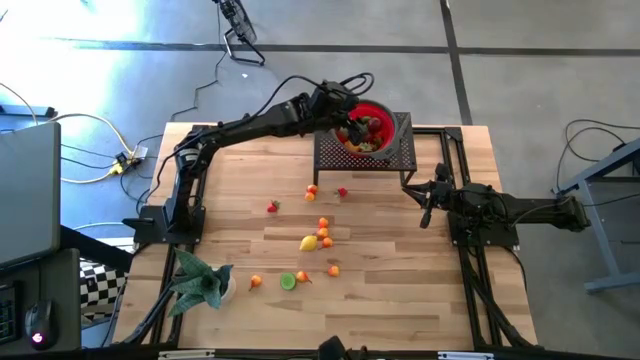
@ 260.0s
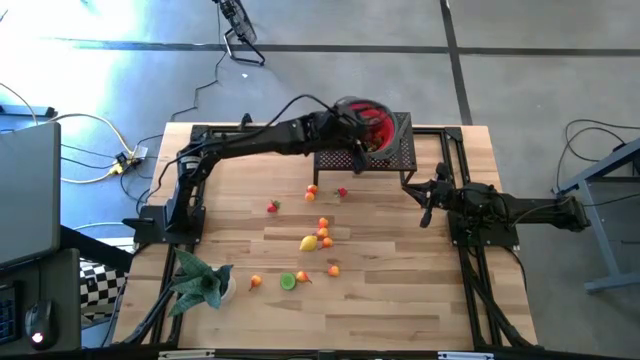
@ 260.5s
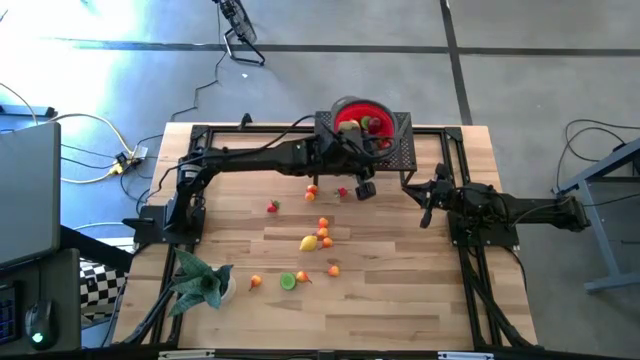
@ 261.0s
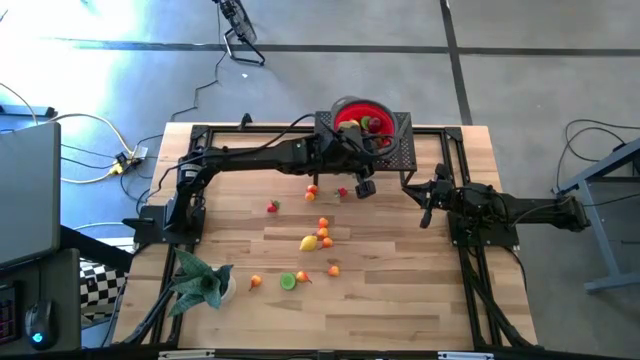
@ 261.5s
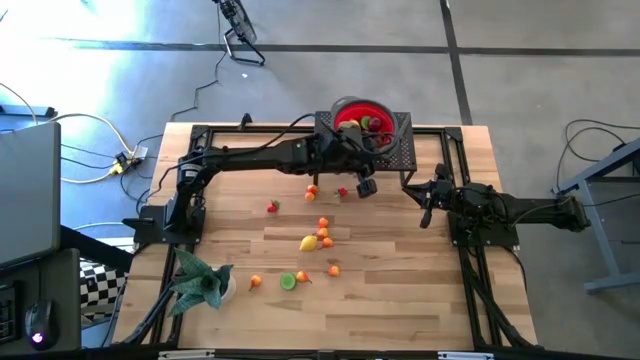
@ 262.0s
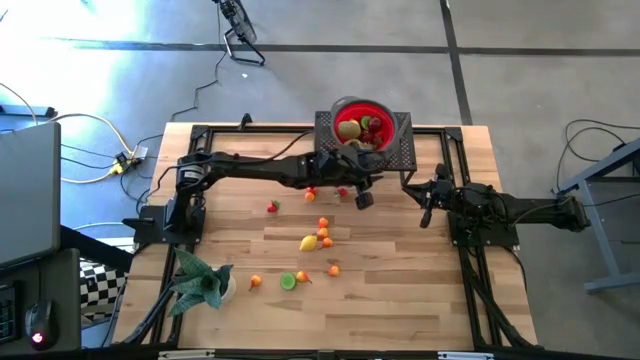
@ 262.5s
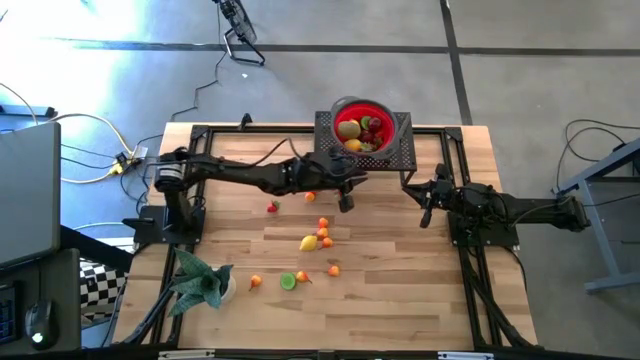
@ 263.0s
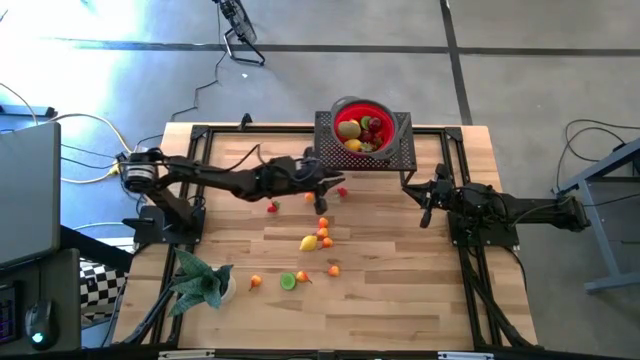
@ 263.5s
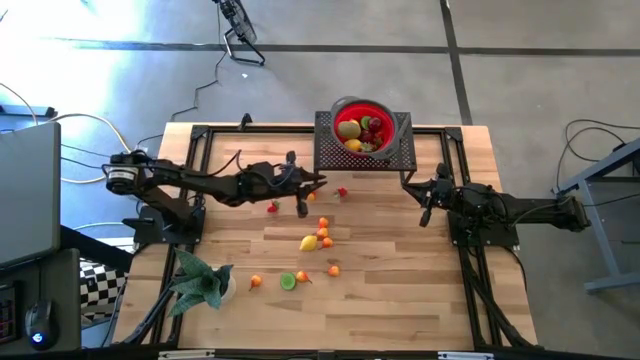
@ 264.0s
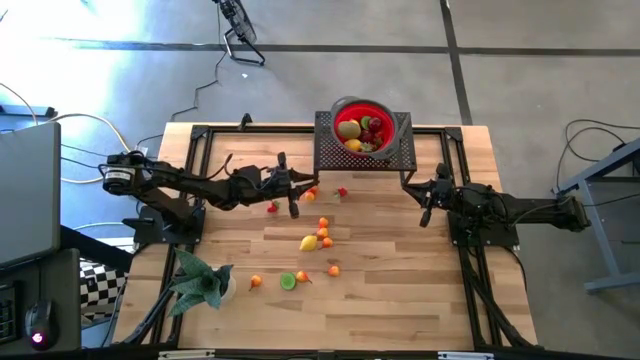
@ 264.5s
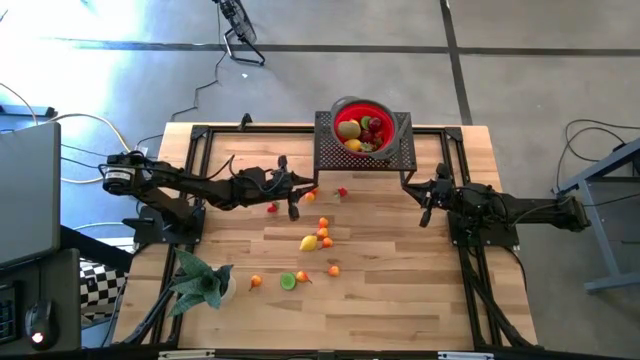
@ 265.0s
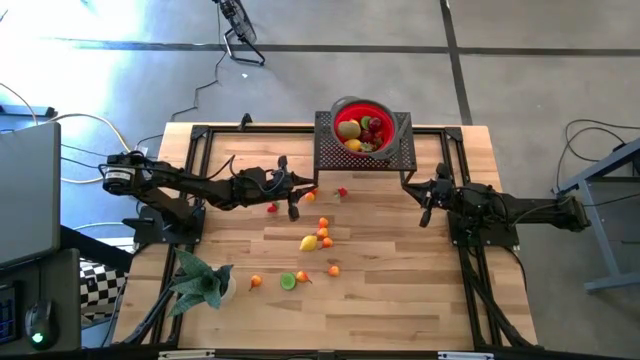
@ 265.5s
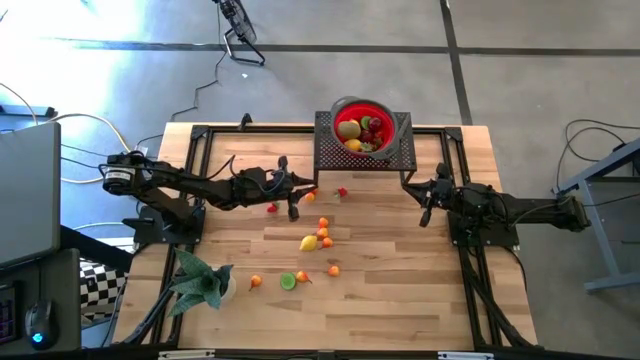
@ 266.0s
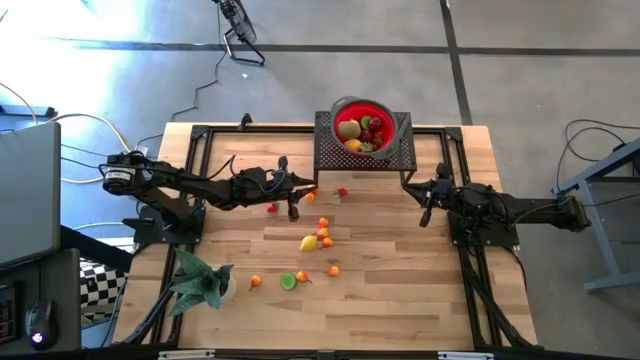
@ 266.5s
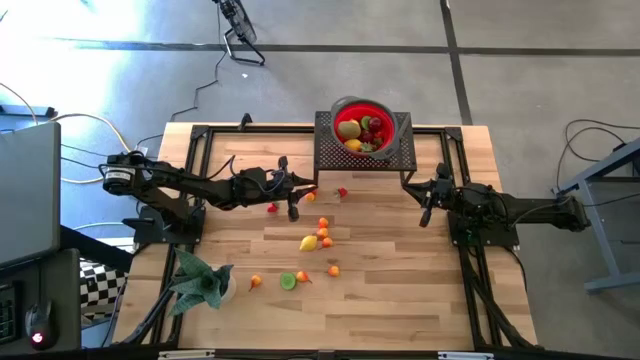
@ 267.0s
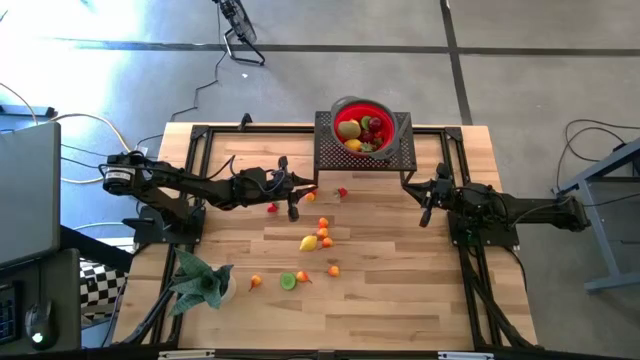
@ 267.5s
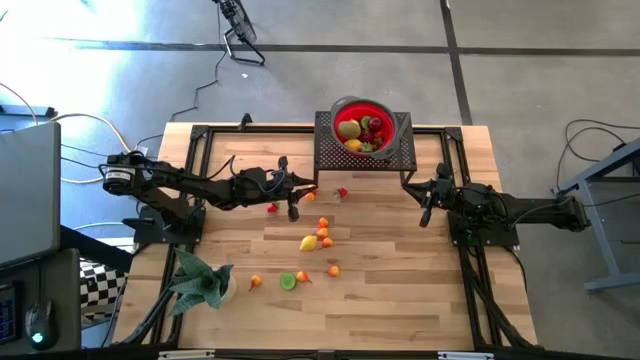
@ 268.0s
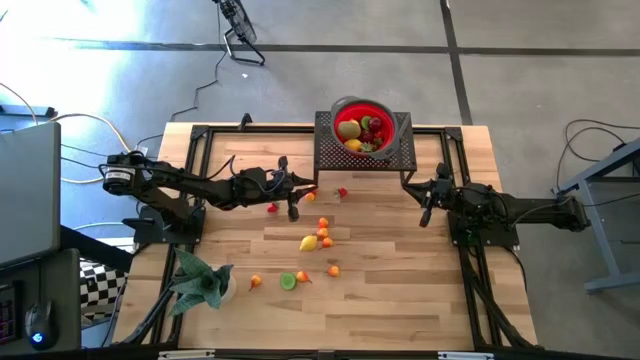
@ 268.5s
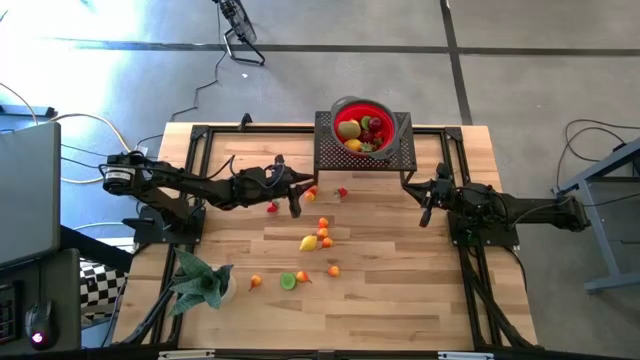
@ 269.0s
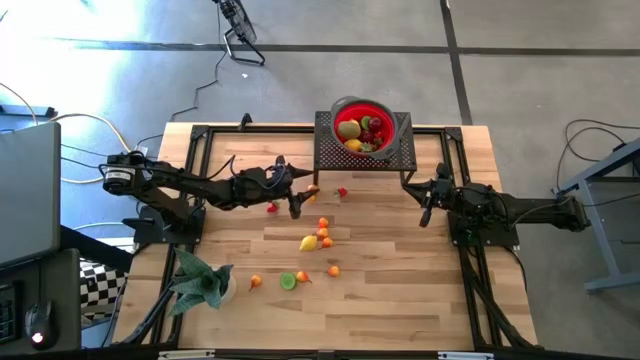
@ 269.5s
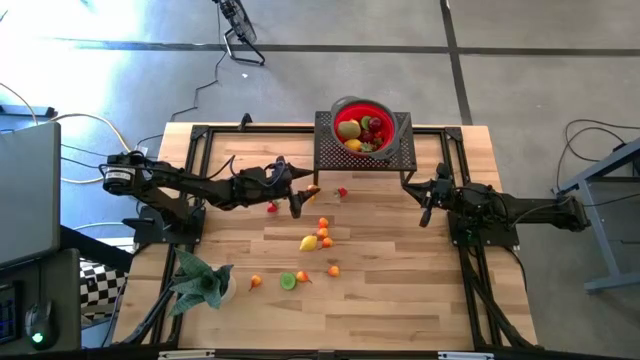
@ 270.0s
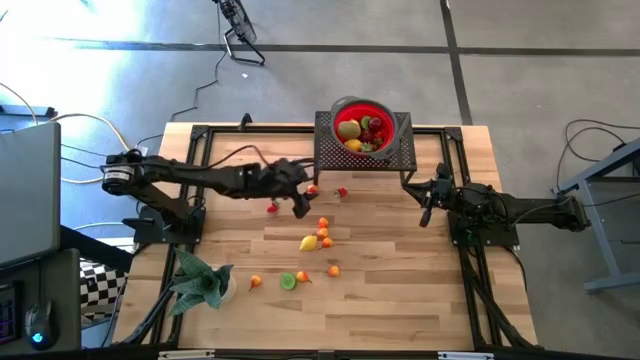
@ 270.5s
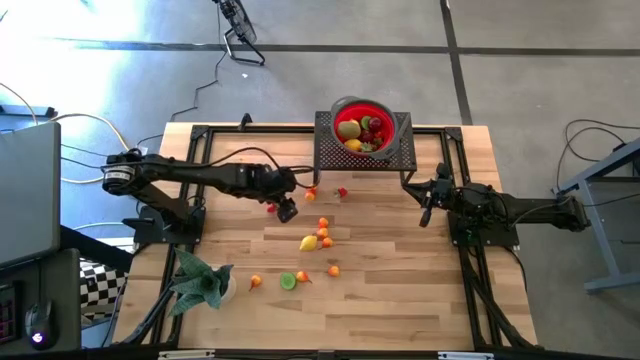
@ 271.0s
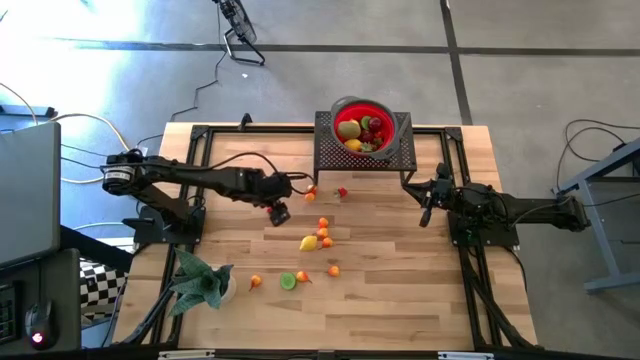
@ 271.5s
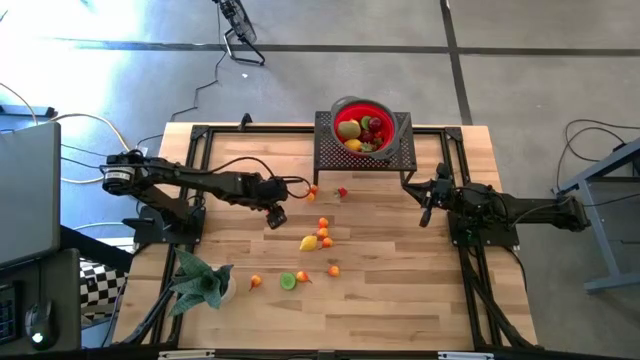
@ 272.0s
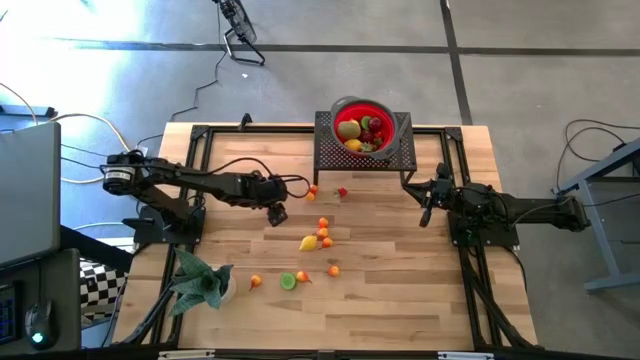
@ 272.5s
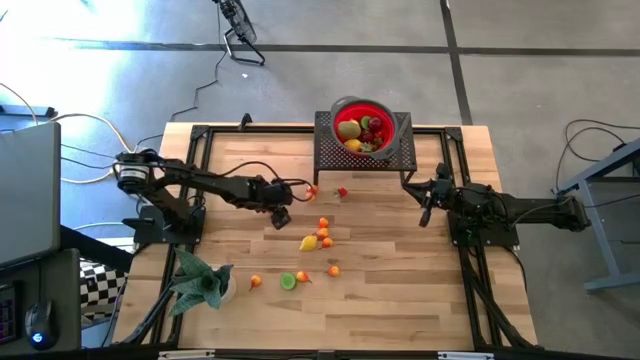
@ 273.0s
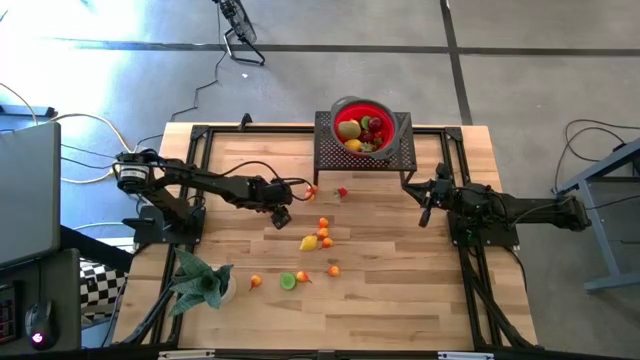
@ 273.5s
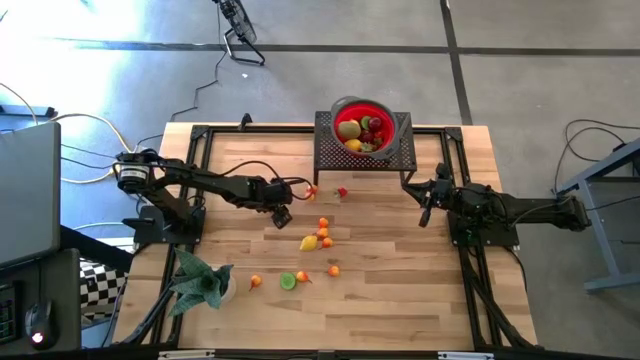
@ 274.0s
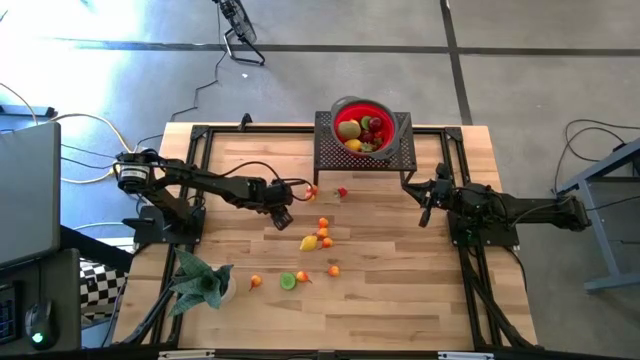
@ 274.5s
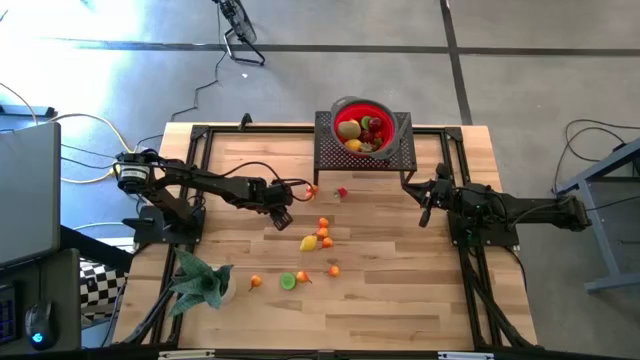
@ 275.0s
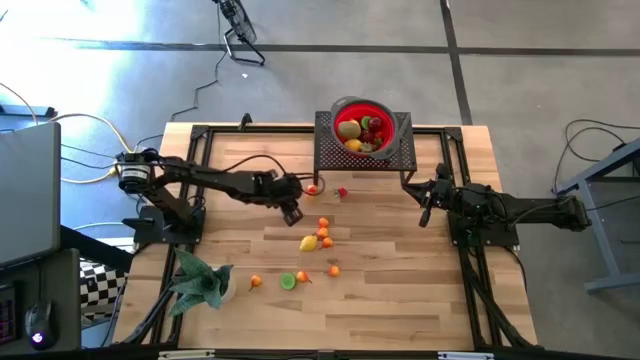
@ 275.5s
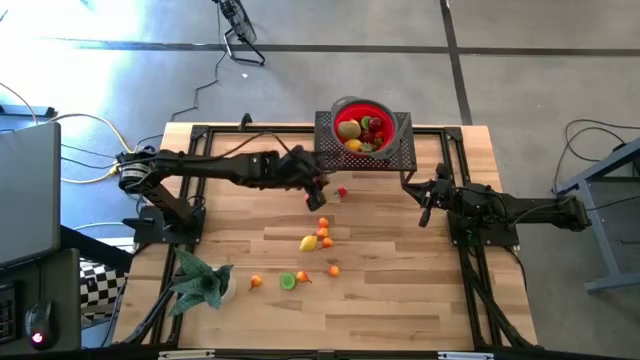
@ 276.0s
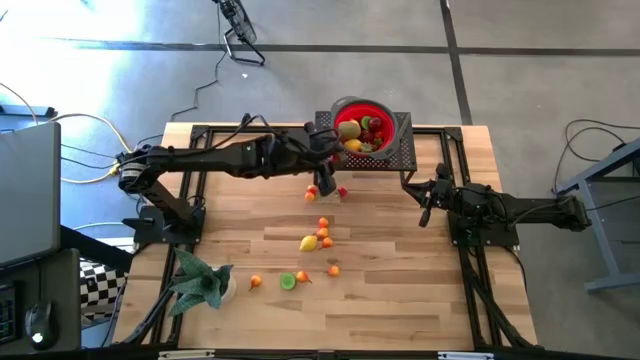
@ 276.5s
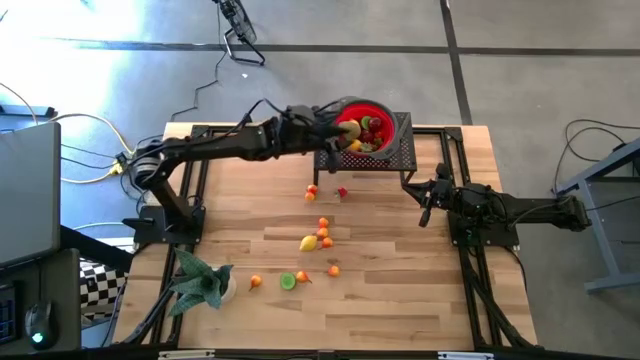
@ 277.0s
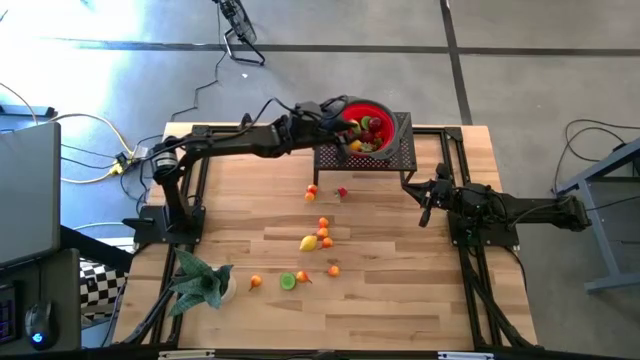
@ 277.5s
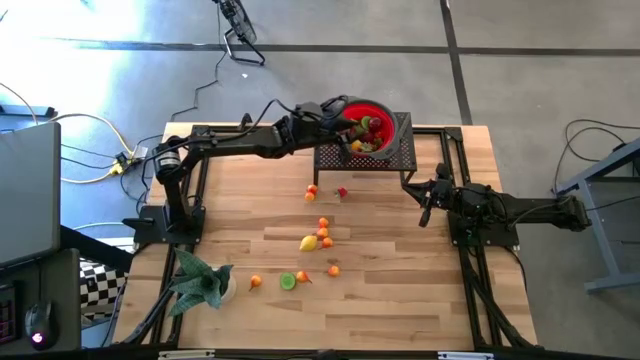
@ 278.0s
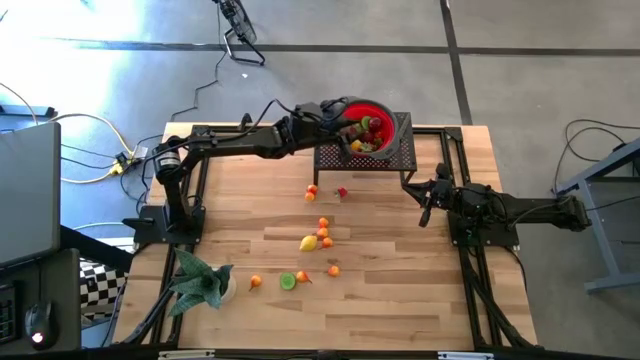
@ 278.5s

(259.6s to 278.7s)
Task: Pick & Place Fruit
Put the strawberry into the strainer on the shelf

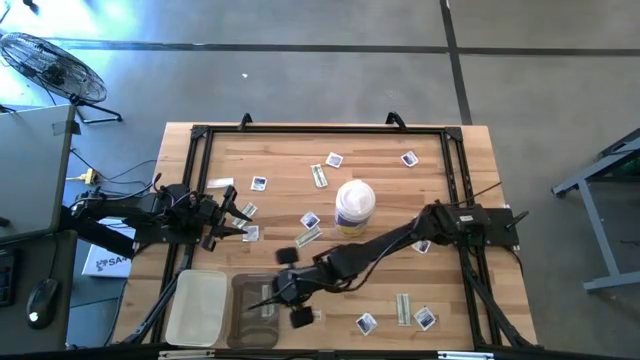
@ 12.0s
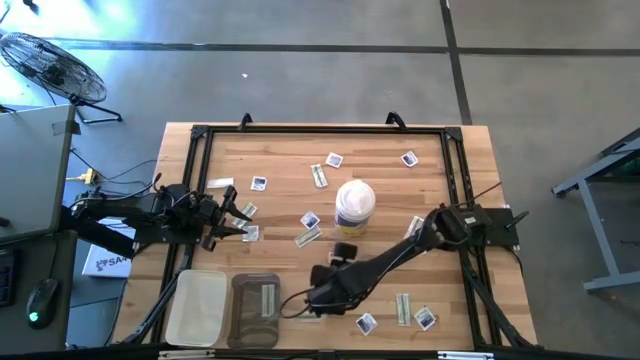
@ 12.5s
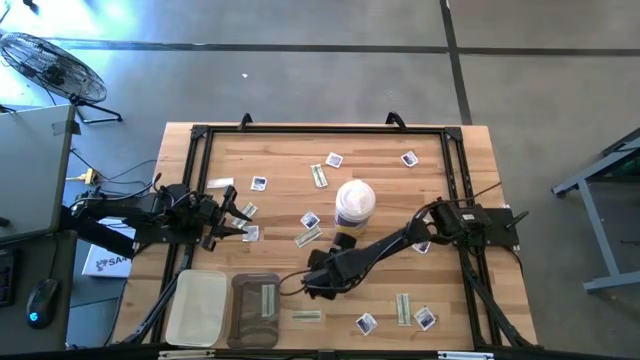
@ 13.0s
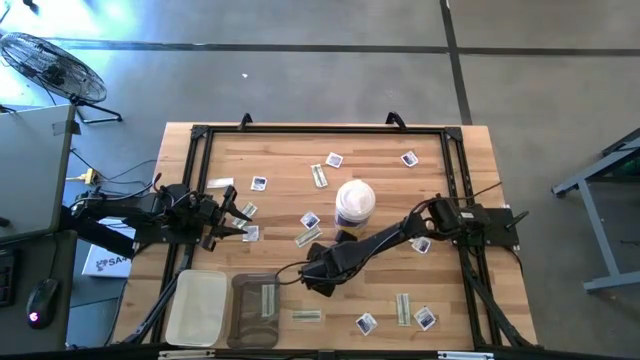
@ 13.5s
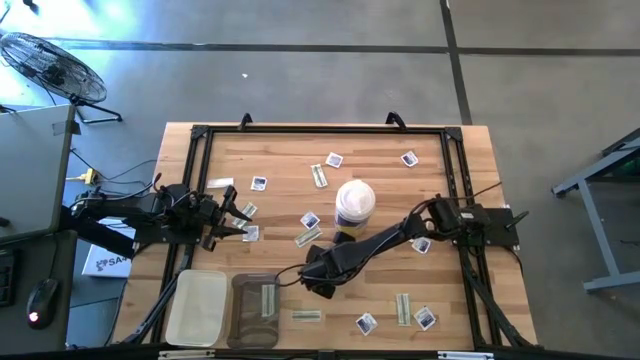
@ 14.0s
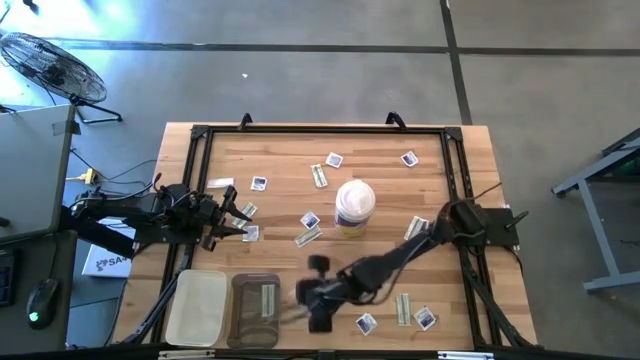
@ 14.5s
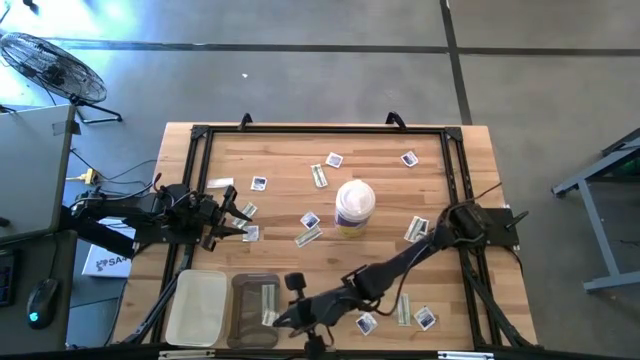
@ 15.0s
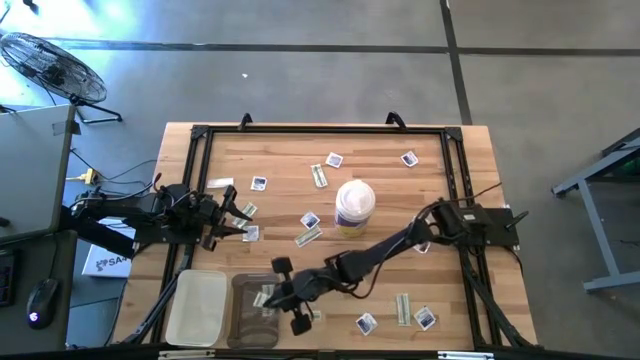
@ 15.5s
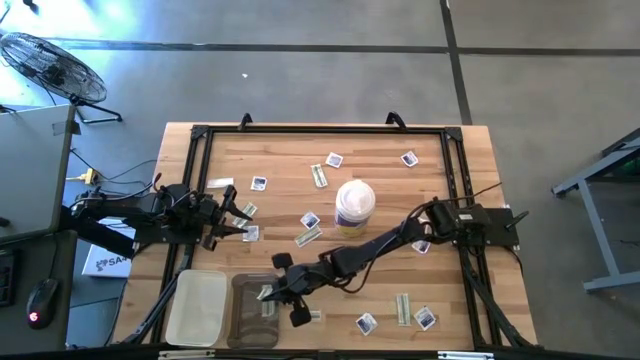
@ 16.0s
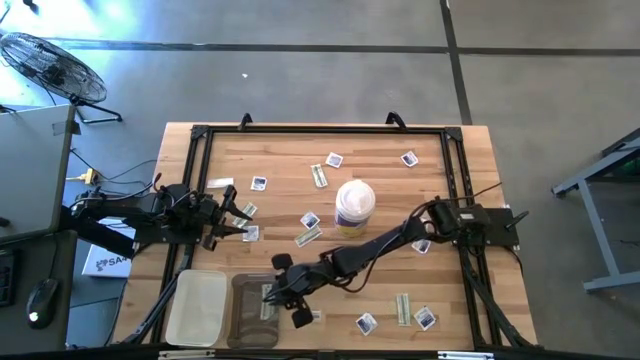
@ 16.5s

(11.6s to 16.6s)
Task: Pick & Place First Aid Supplies
Put the bandage into the black transparent bin
